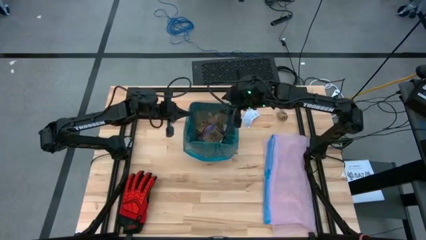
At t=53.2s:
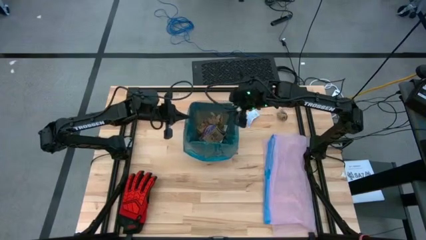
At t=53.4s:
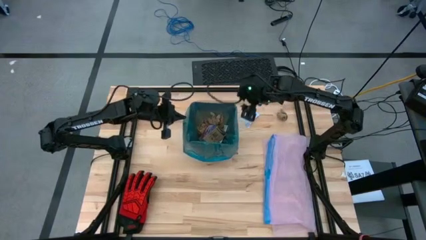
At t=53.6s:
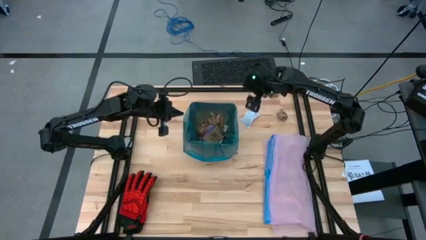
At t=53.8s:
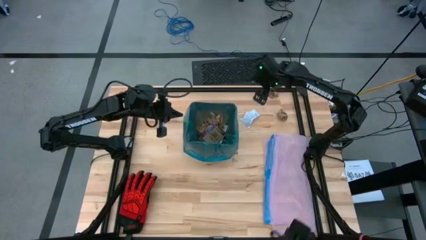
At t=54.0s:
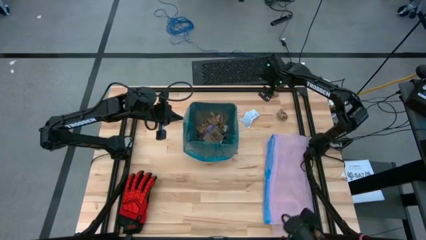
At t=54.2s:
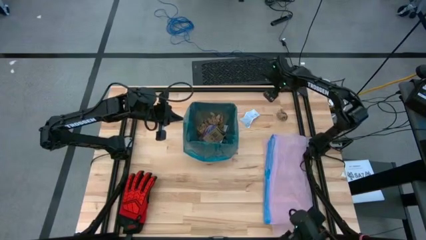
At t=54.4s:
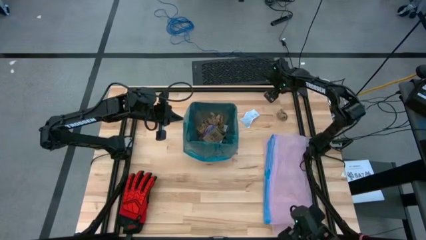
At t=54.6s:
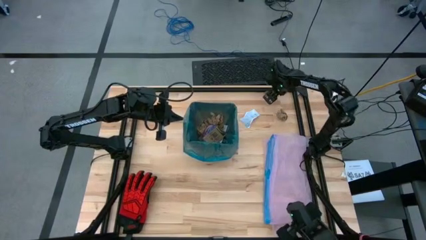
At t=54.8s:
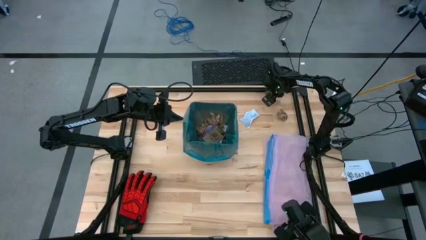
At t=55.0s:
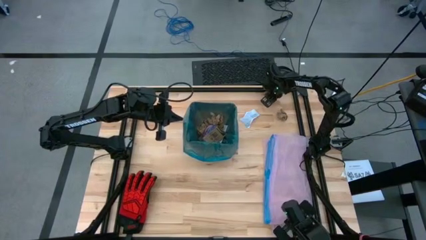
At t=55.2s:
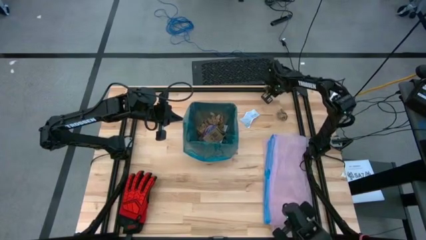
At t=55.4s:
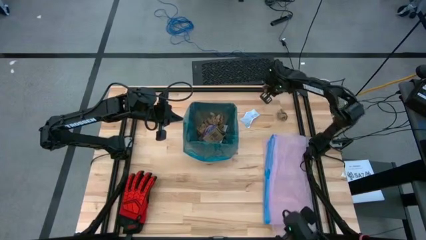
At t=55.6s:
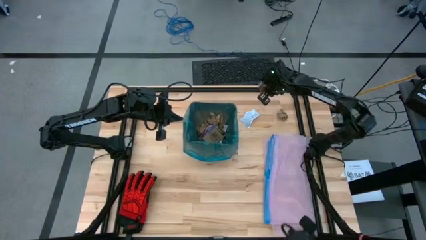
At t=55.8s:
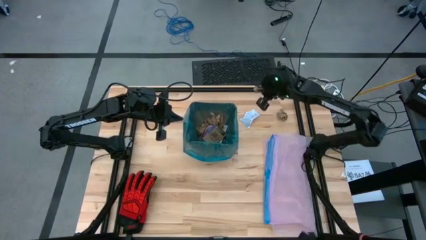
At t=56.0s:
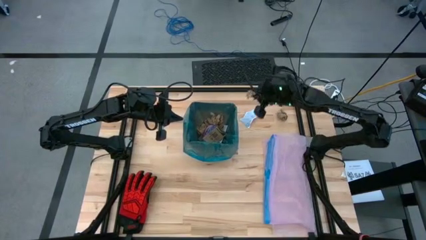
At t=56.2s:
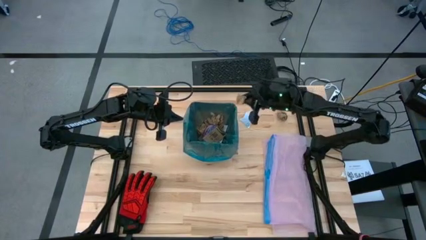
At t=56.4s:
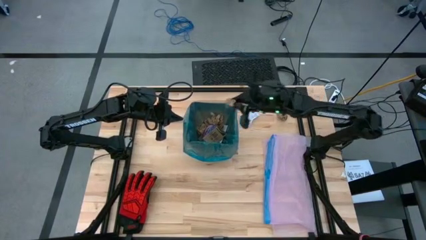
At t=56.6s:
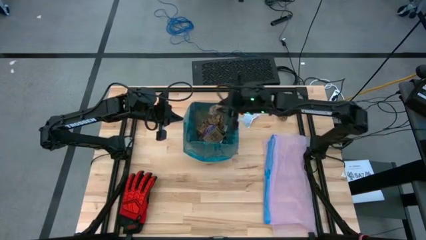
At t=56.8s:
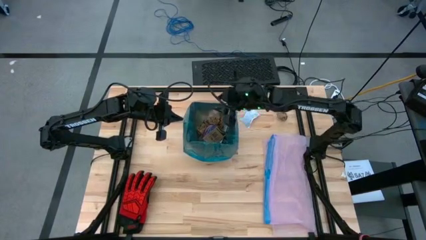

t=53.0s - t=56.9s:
Task: place trash/remove bag and relplace
Put the brown napkin in the trash bin

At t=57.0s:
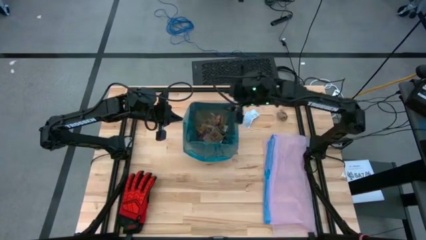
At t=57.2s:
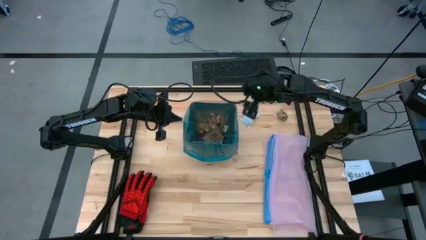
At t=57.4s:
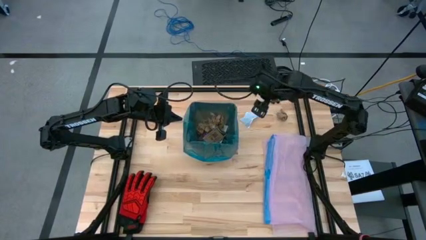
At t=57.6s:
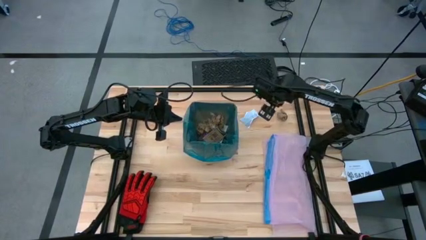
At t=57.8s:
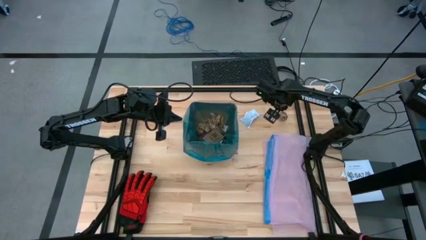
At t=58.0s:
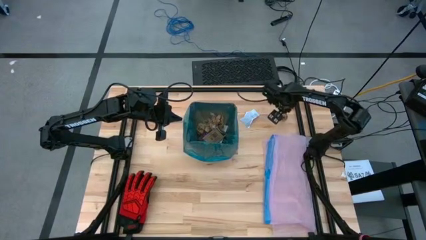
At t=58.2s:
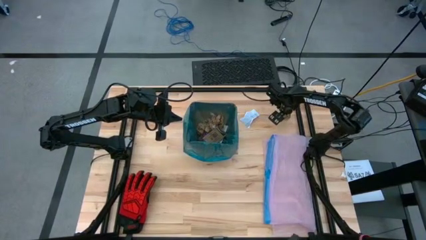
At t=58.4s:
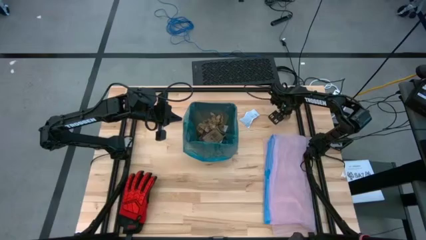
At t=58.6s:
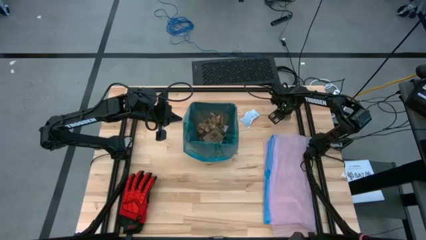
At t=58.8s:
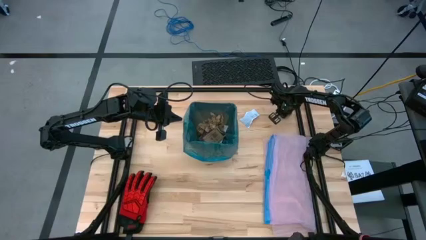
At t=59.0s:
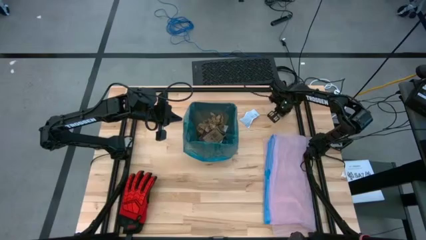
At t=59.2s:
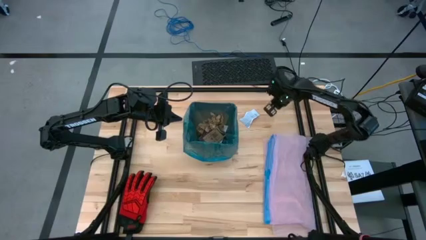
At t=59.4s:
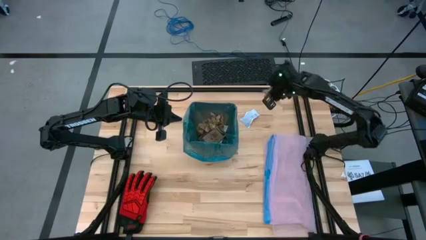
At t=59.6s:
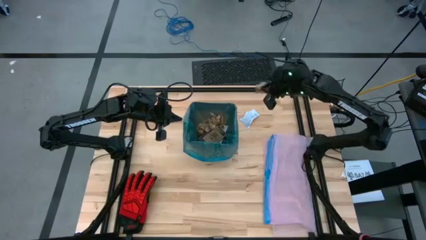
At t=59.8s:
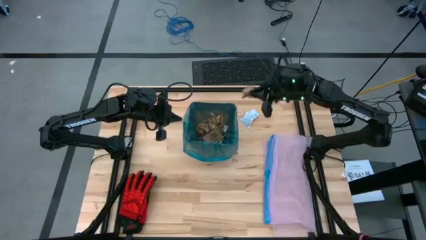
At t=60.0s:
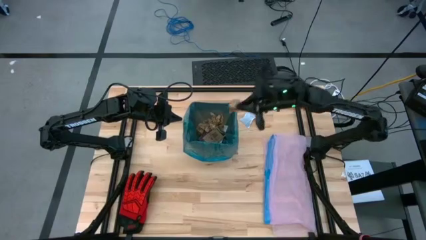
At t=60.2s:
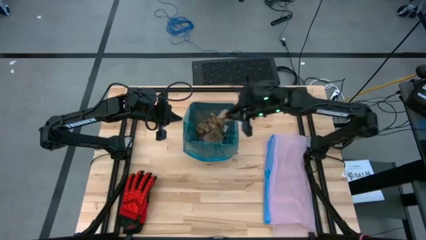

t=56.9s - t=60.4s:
Put the brown napkin in the trash bin

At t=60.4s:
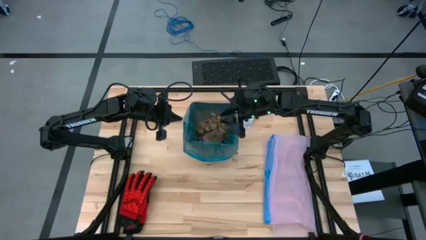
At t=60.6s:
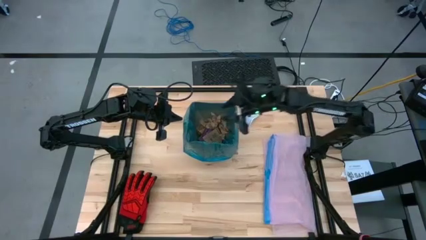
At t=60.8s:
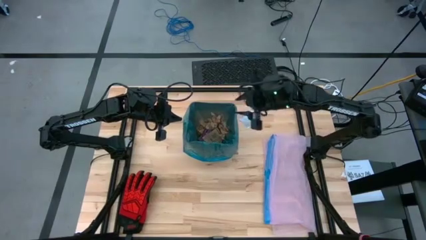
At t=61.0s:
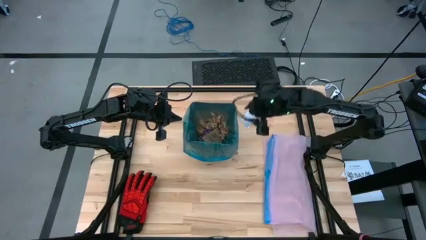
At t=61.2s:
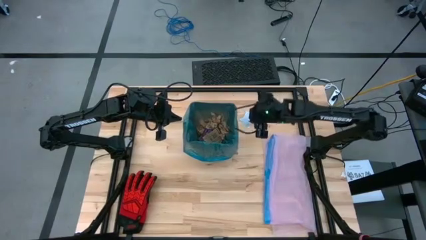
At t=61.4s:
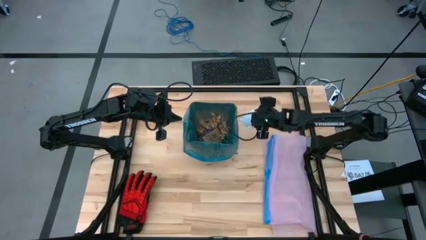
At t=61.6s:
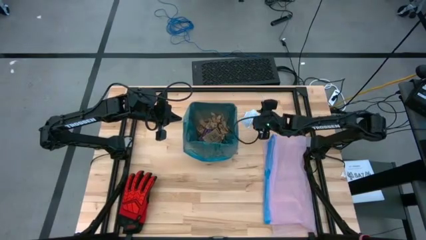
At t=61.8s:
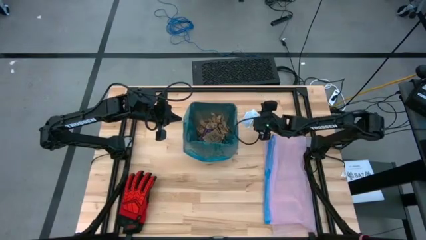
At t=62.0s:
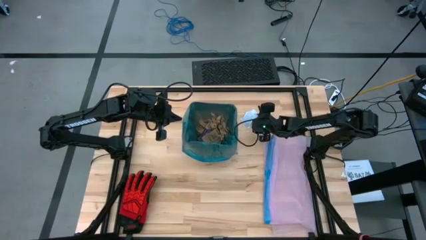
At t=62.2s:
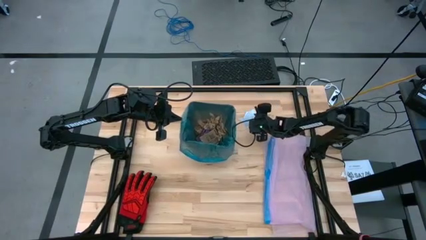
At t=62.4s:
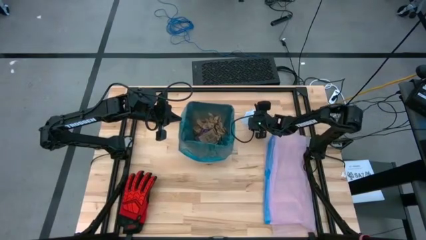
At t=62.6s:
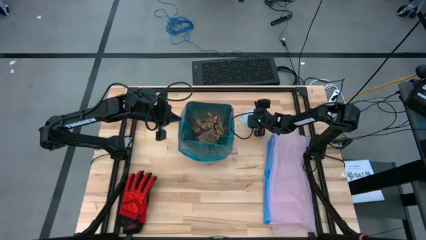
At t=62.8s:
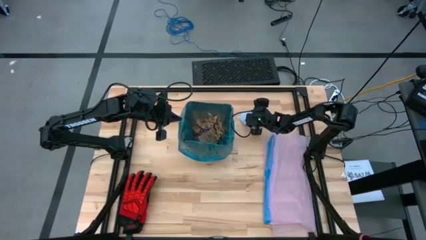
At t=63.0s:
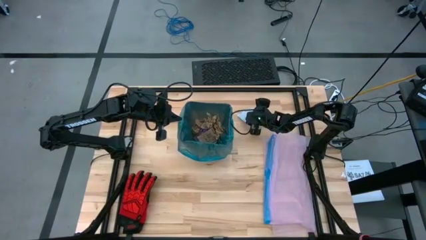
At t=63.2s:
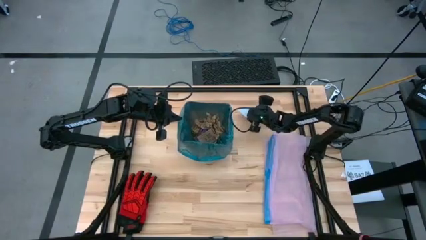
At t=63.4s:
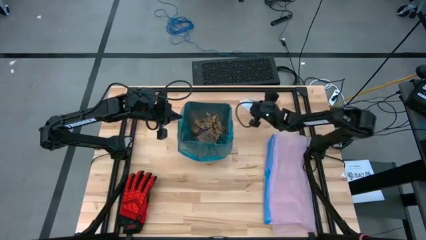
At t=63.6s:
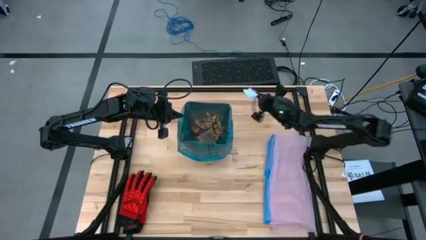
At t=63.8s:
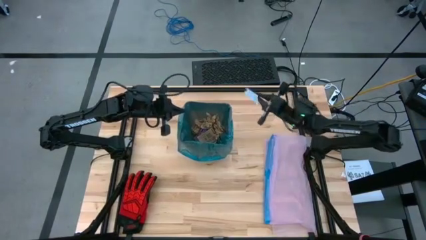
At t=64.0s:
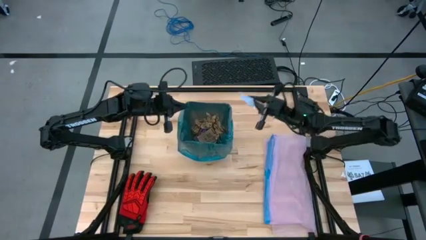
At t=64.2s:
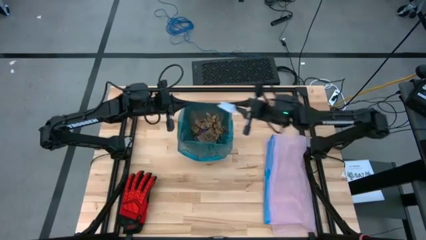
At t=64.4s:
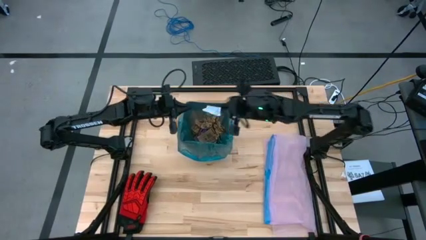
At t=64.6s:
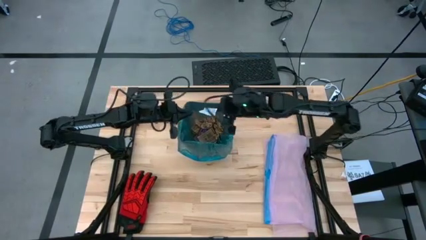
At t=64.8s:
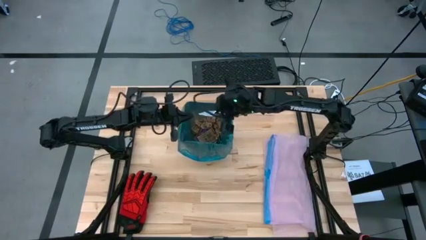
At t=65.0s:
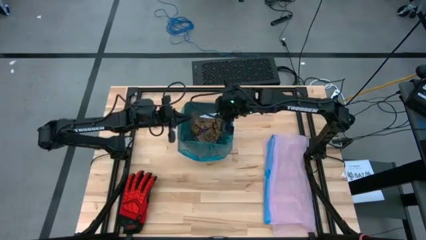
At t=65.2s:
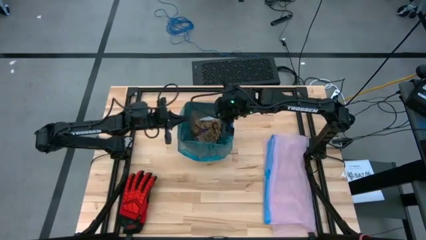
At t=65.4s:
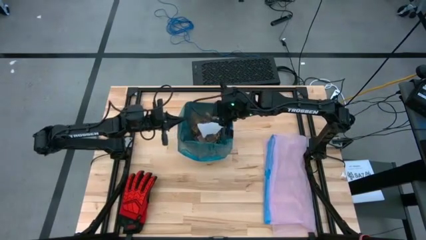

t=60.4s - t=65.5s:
Put the white paper in the trash bin

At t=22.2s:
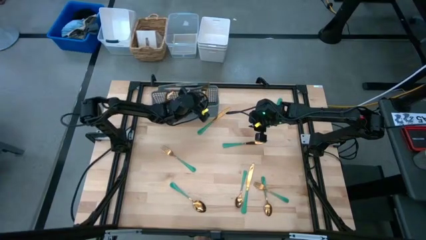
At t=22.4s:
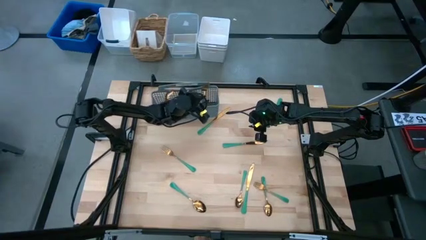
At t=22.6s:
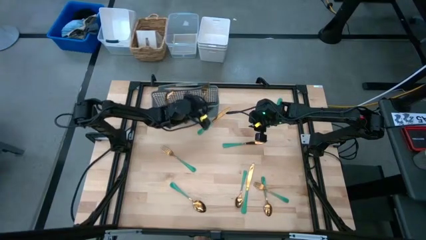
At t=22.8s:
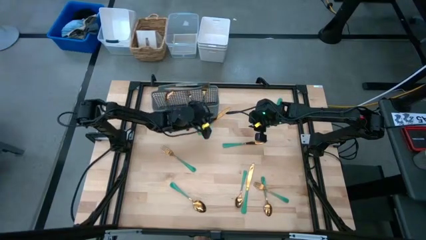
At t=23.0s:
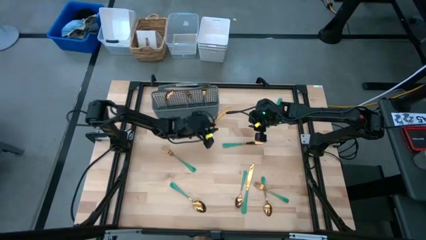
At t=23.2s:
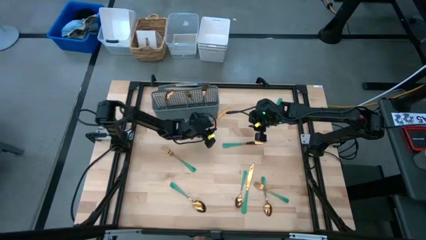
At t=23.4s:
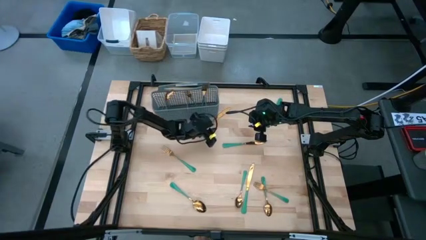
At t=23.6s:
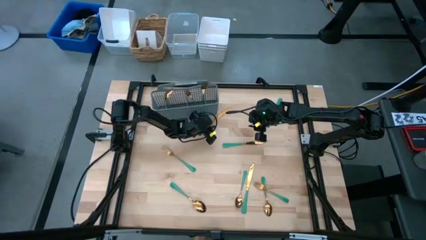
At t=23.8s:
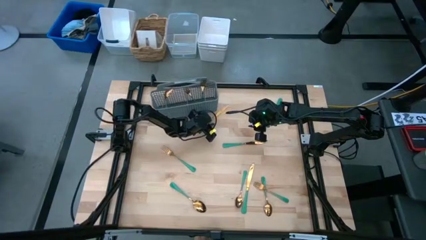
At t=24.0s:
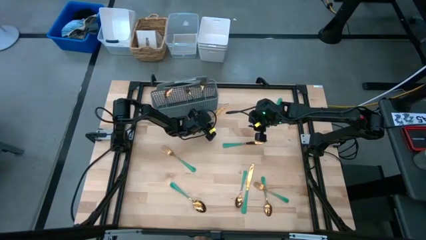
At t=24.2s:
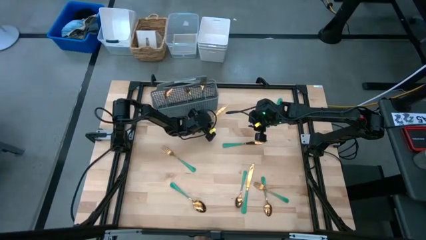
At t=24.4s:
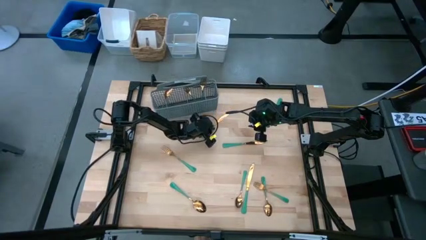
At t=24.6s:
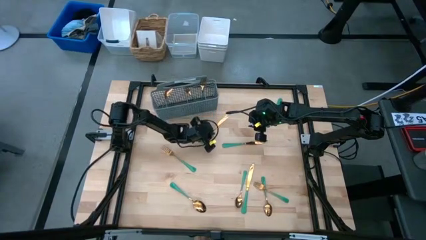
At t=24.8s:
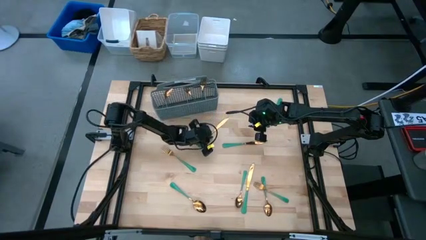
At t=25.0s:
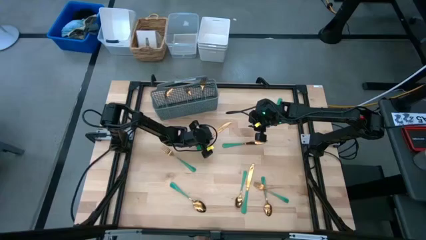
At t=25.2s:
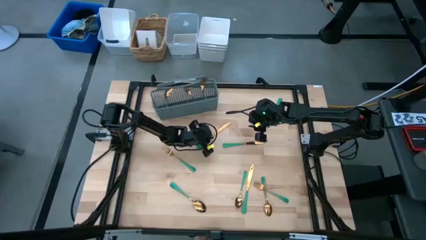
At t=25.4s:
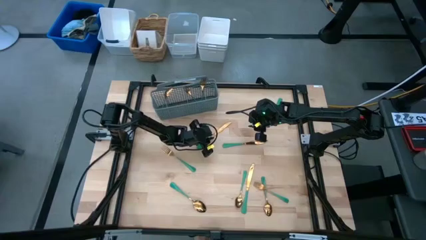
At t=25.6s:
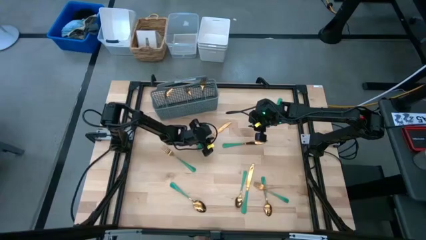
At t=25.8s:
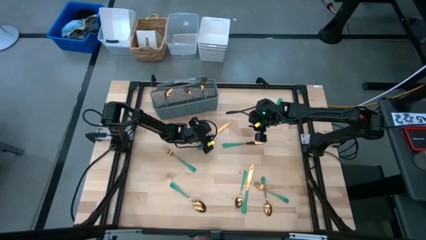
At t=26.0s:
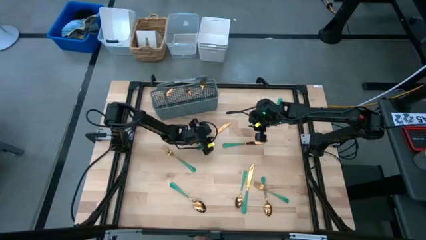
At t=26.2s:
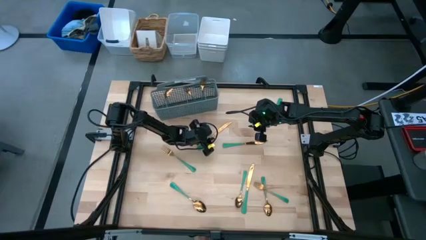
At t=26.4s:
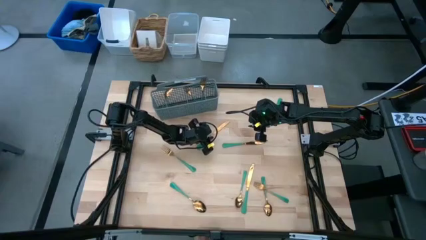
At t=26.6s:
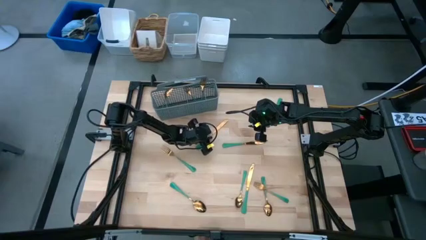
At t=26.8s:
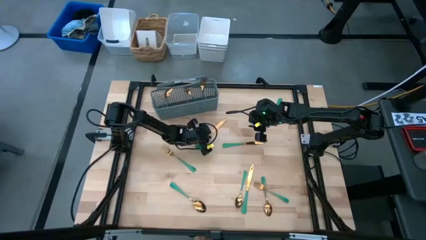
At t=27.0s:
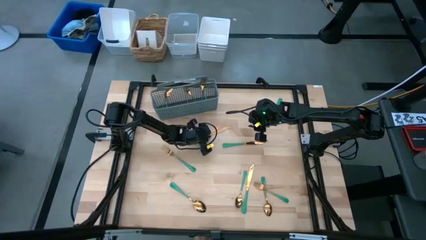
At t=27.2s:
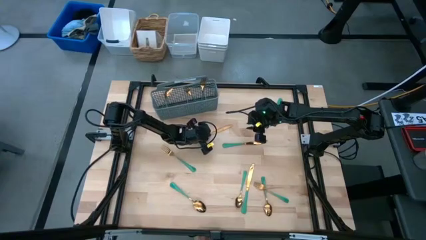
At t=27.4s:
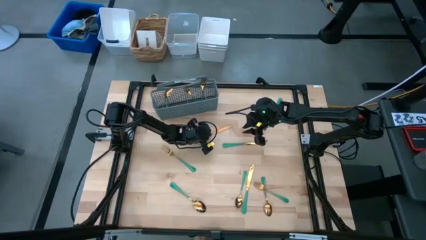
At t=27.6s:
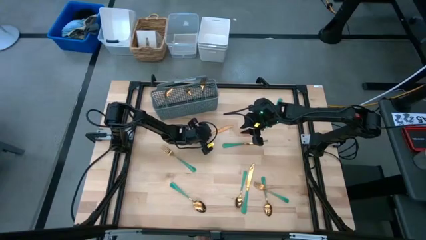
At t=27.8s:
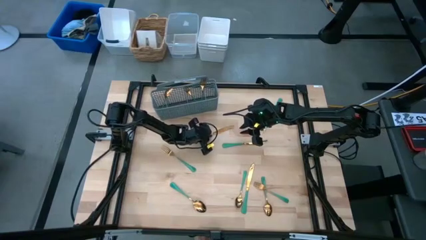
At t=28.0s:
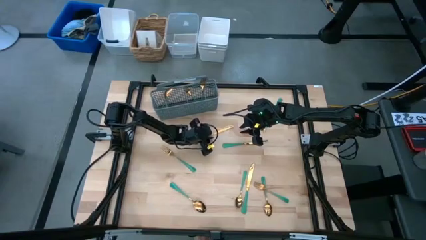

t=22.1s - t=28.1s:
Task: Sort silverware
Put the knife into the middle left section of the silverware holder
